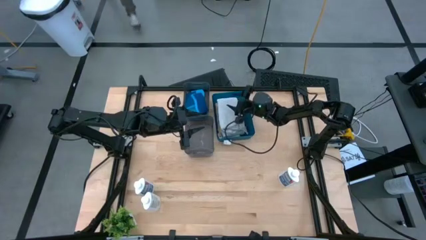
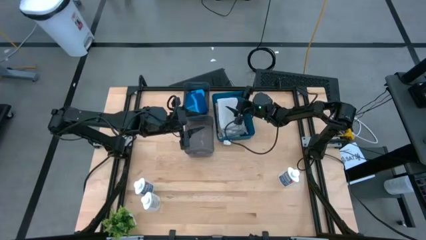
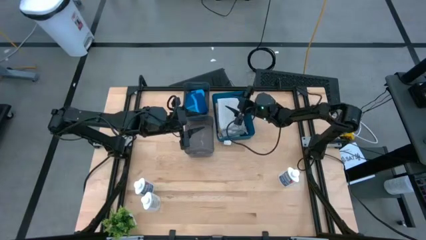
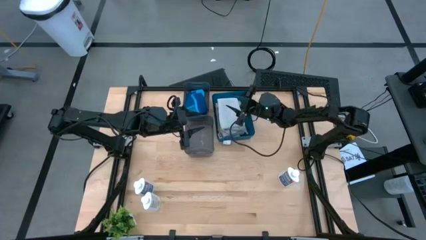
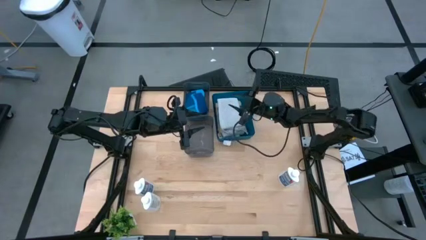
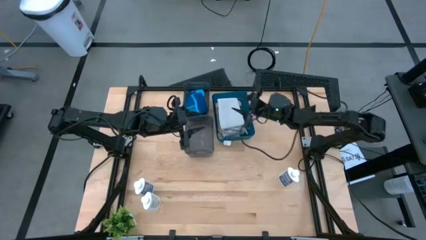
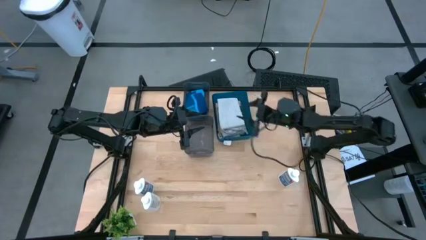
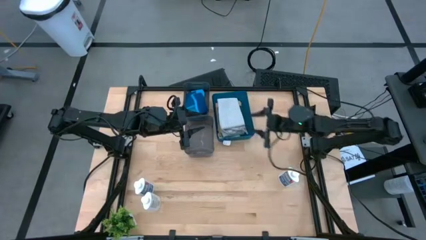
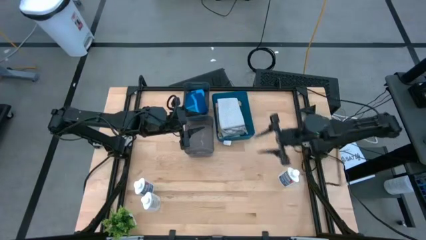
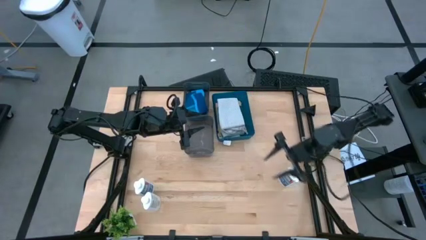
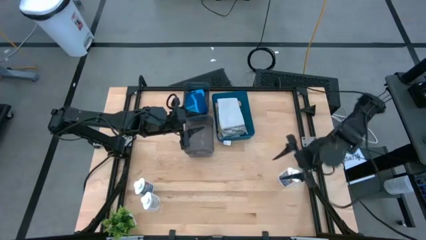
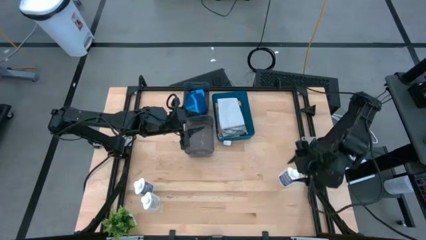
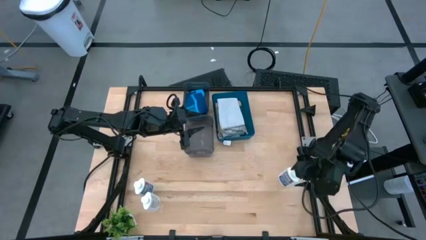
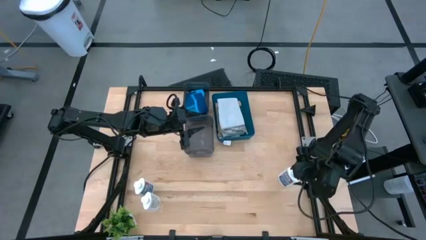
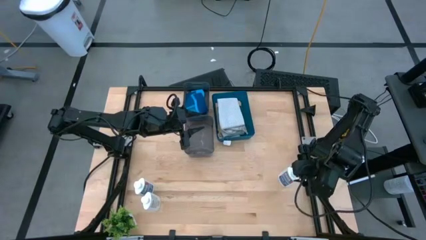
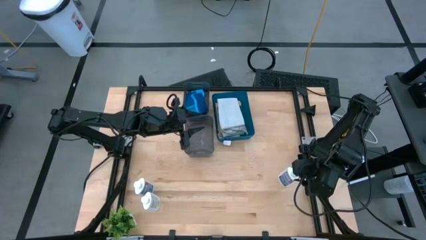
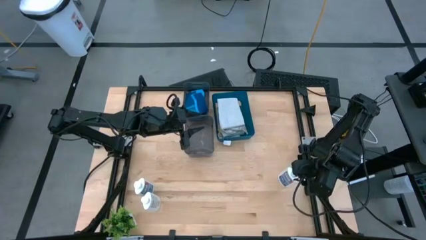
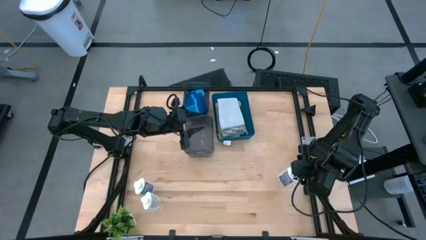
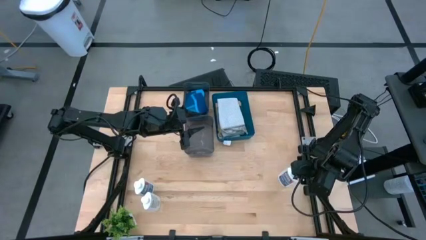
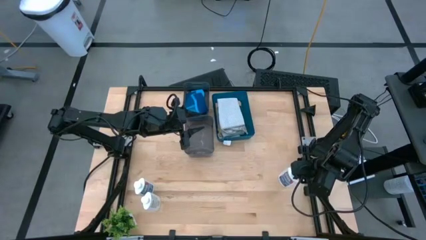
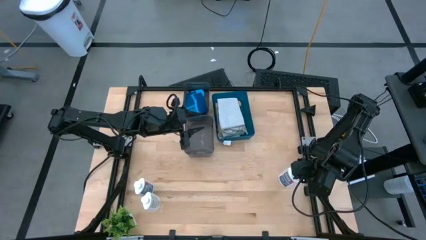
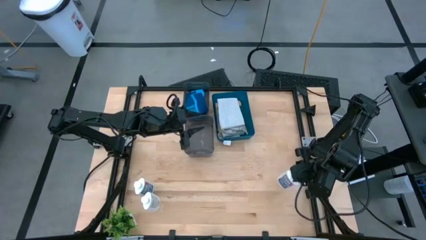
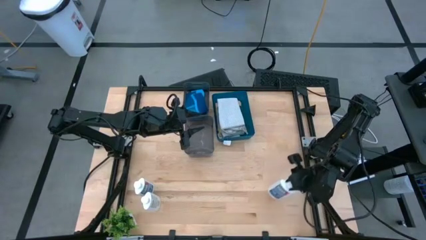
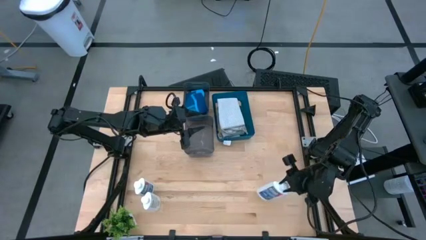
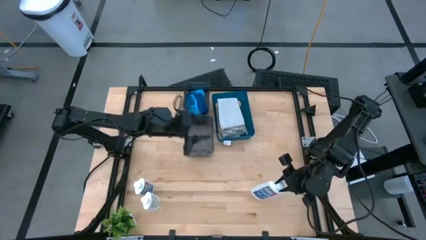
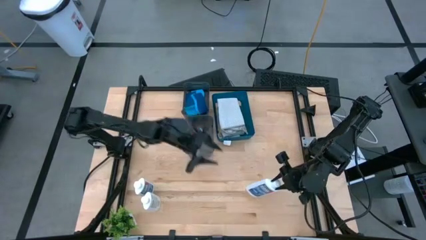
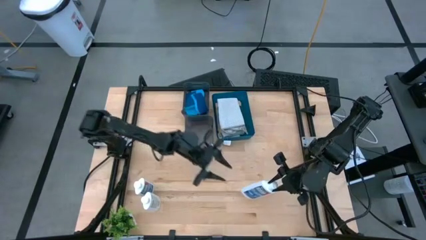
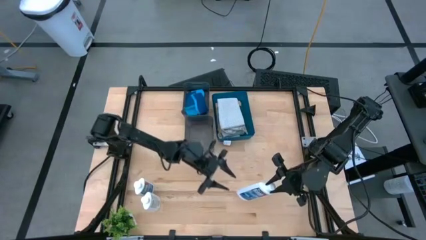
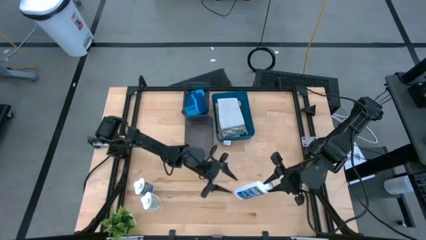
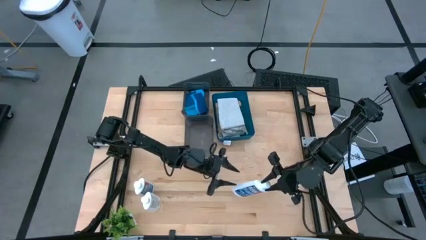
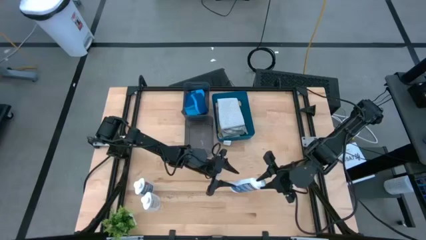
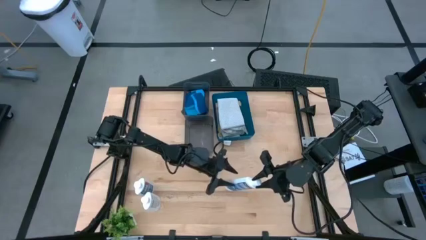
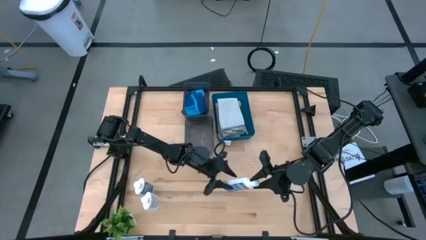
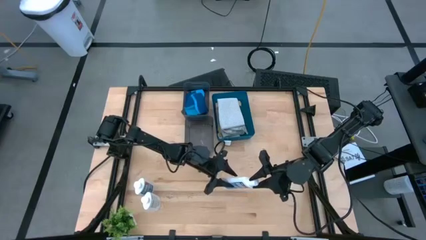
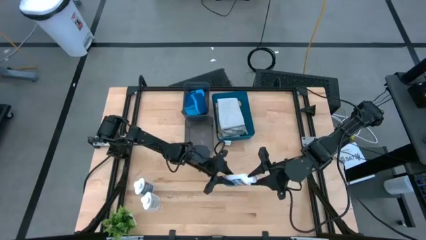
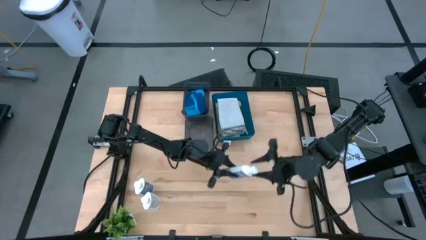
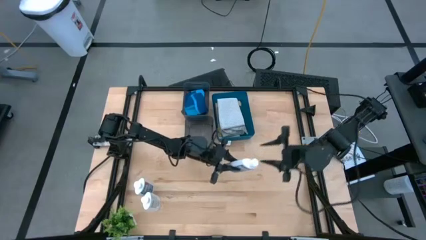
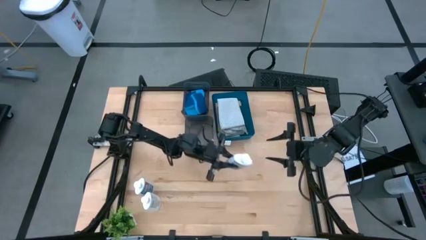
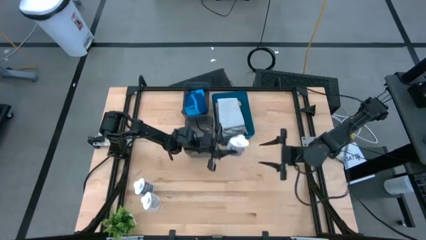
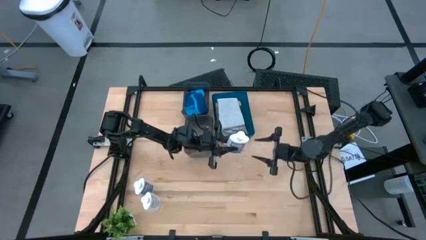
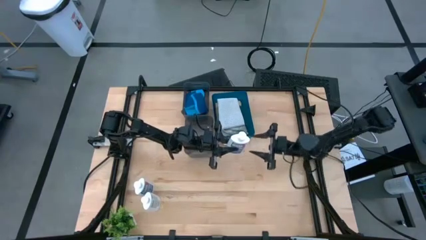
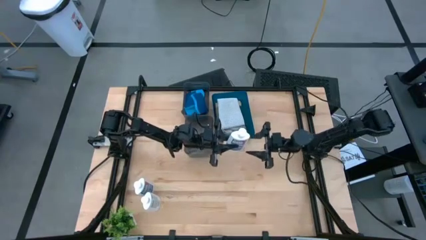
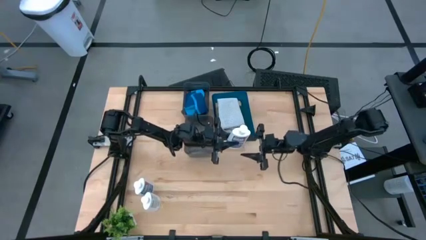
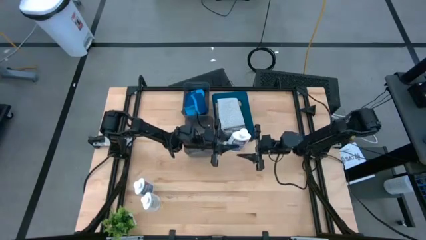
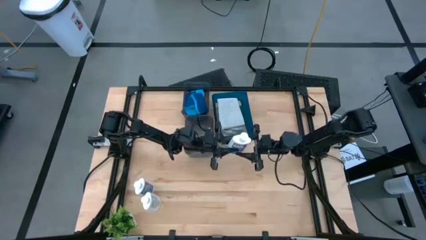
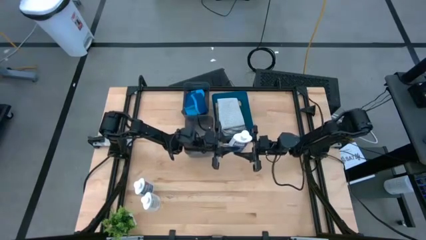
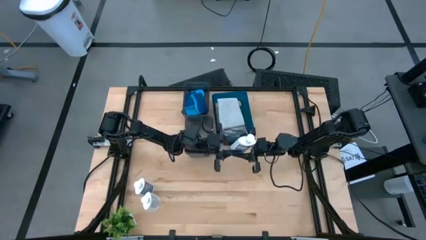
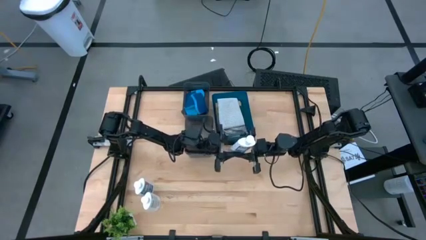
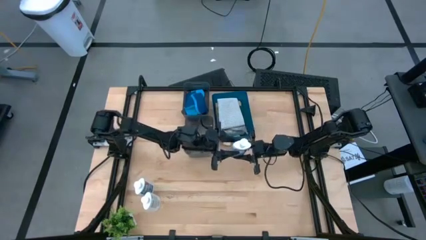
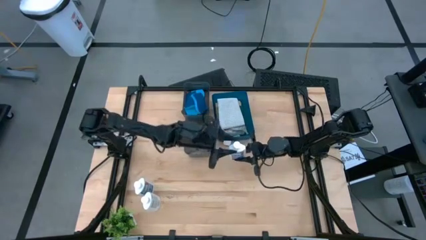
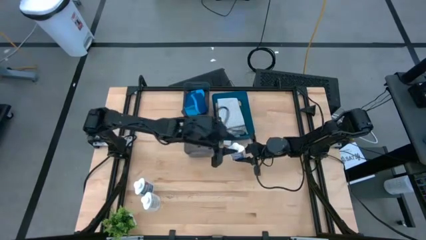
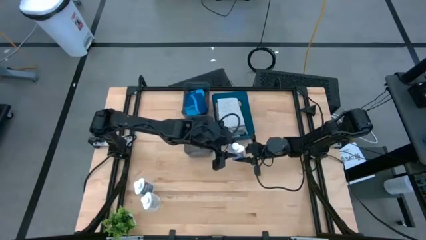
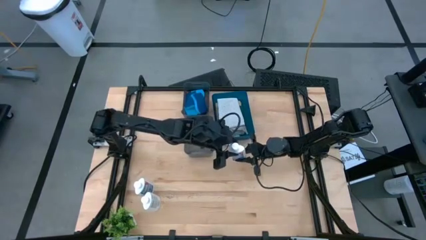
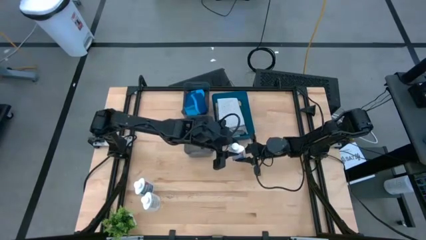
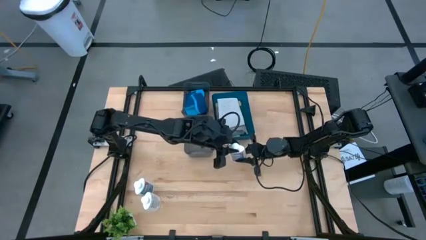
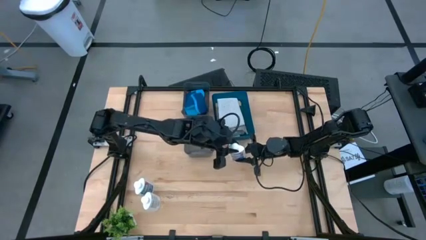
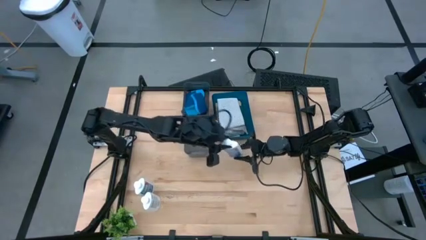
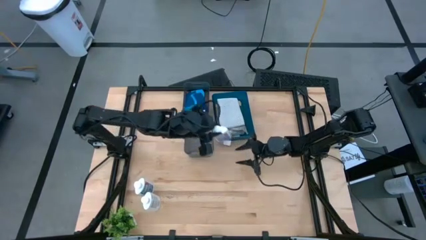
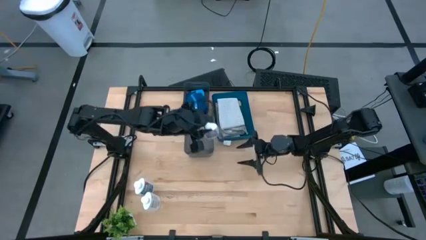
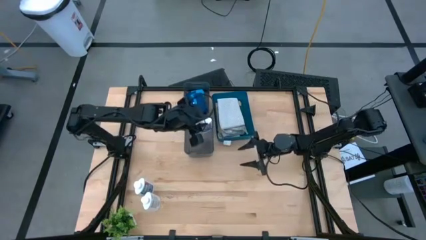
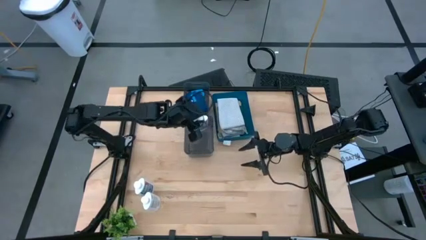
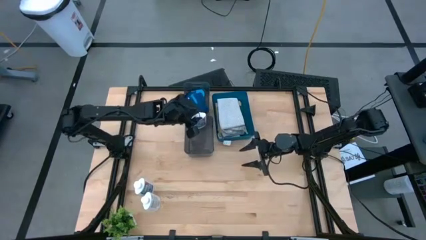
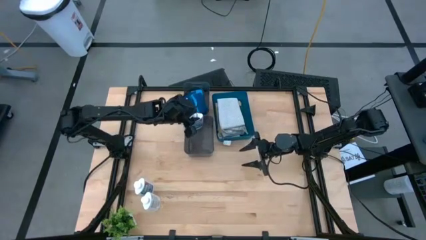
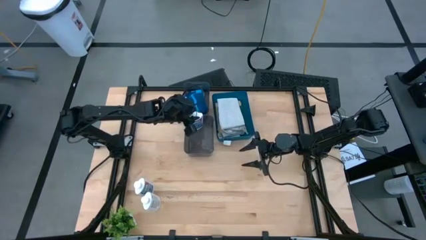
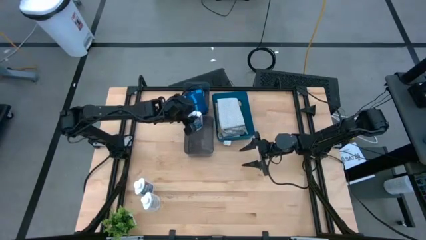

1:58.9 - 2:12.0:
Task: Pick & Place Kitchen Items
Put the top right white plastic restorer bottle into the bottom black bin
